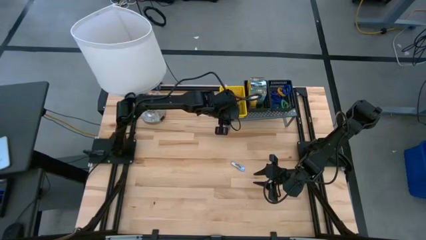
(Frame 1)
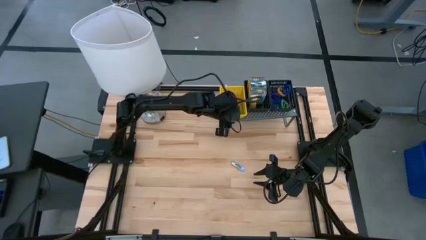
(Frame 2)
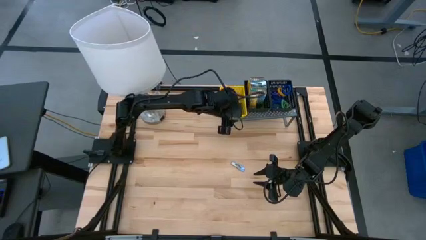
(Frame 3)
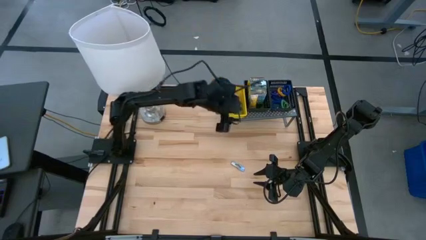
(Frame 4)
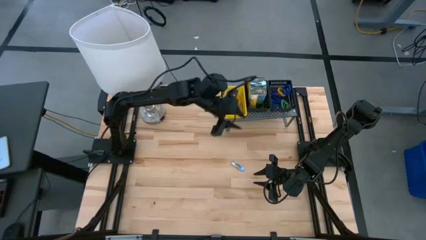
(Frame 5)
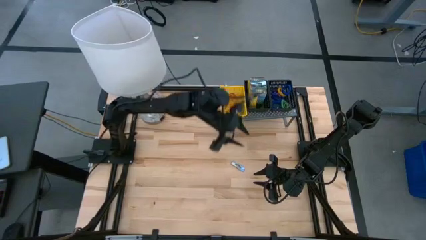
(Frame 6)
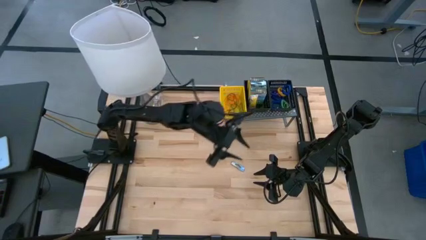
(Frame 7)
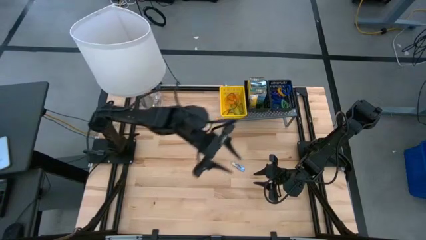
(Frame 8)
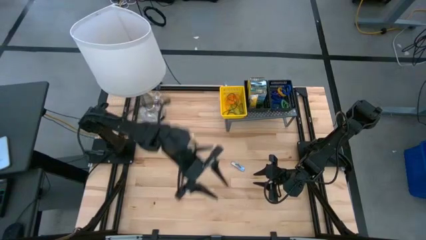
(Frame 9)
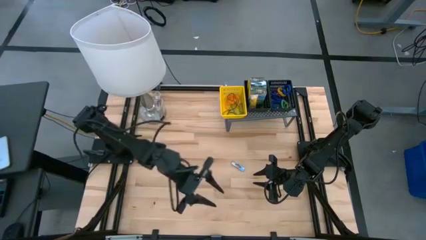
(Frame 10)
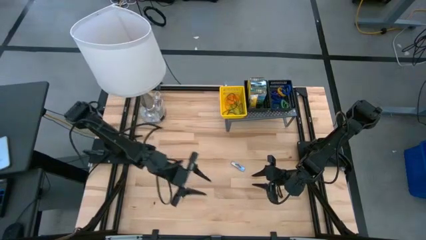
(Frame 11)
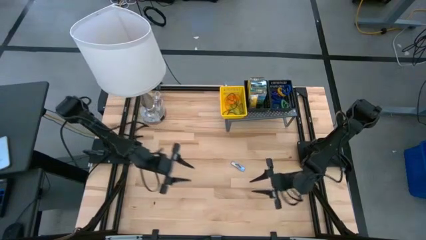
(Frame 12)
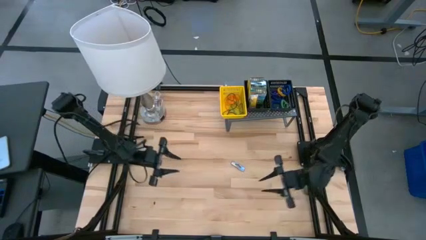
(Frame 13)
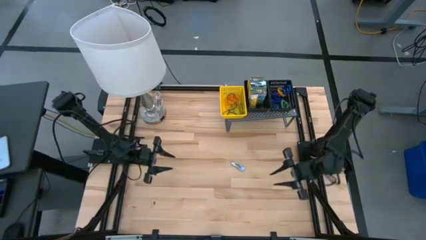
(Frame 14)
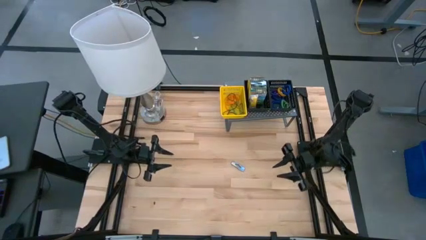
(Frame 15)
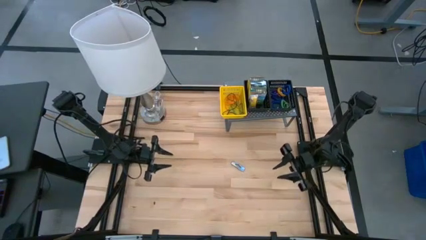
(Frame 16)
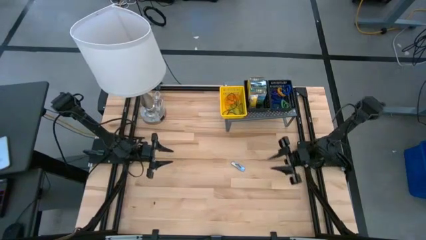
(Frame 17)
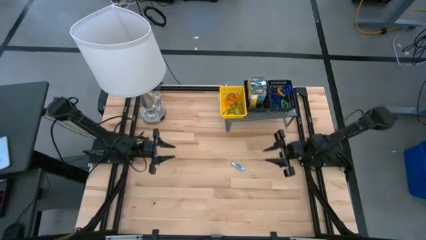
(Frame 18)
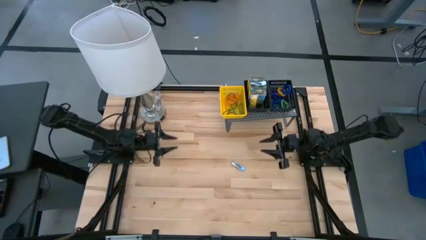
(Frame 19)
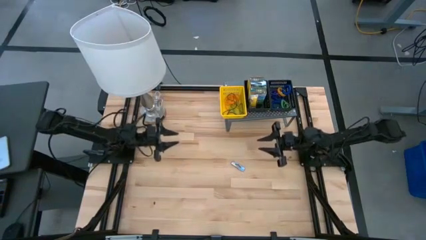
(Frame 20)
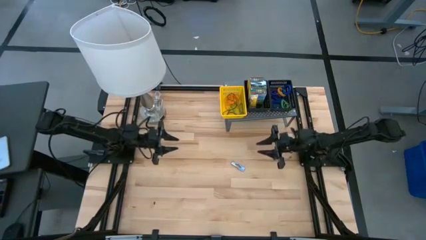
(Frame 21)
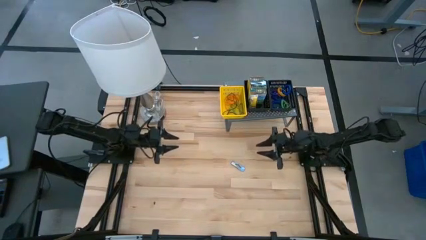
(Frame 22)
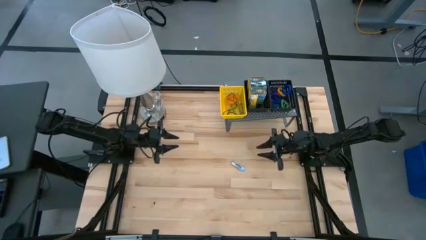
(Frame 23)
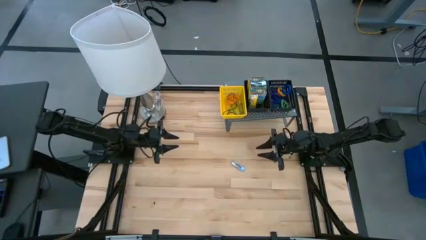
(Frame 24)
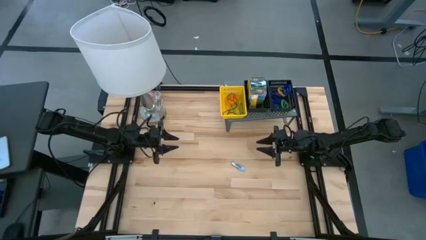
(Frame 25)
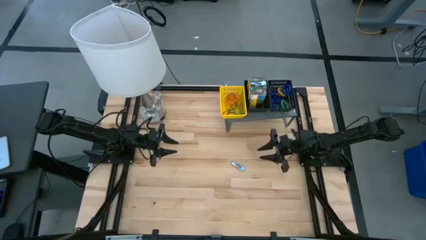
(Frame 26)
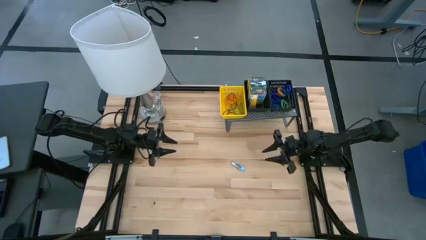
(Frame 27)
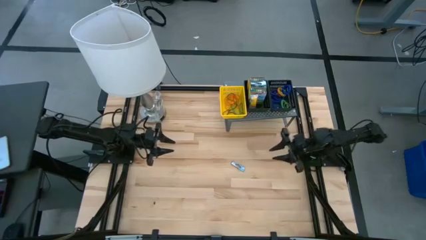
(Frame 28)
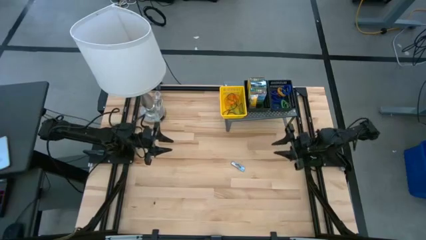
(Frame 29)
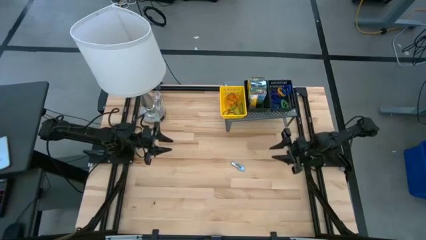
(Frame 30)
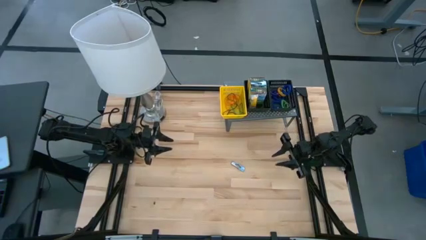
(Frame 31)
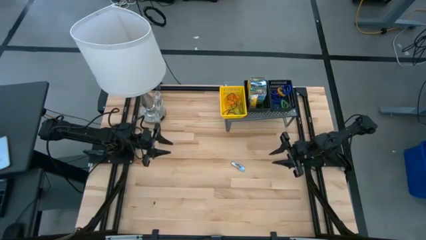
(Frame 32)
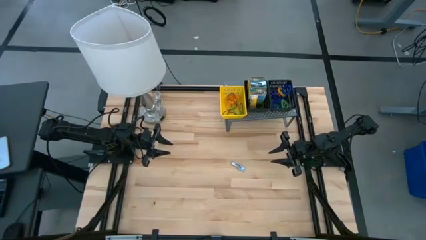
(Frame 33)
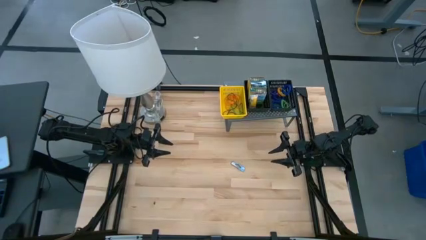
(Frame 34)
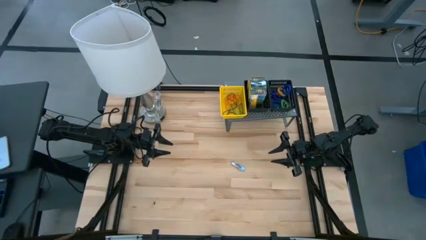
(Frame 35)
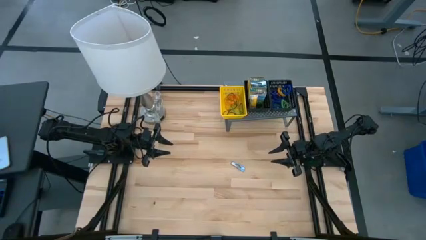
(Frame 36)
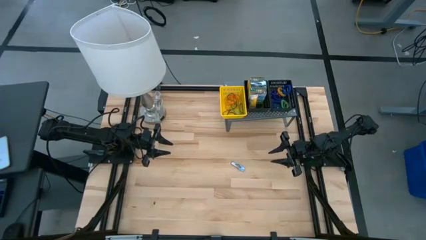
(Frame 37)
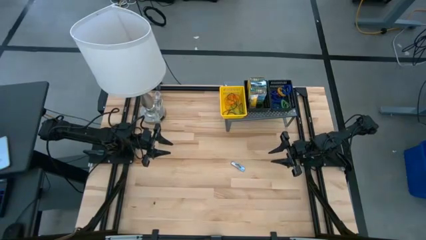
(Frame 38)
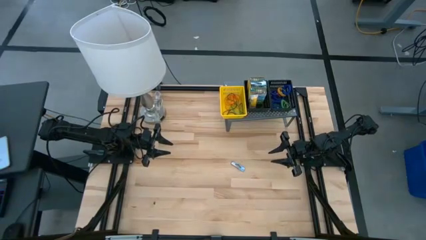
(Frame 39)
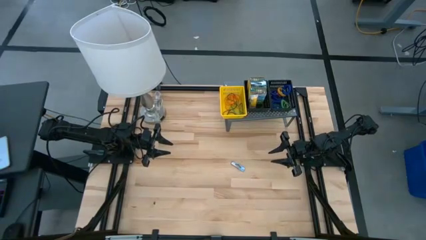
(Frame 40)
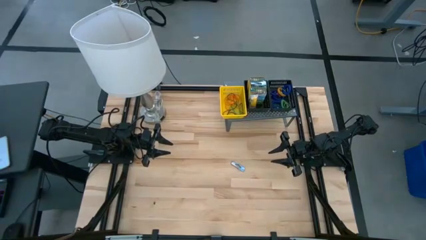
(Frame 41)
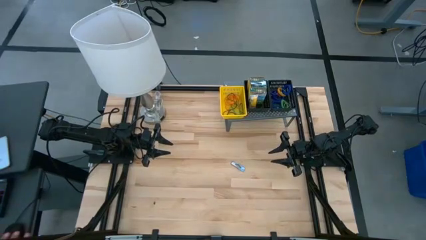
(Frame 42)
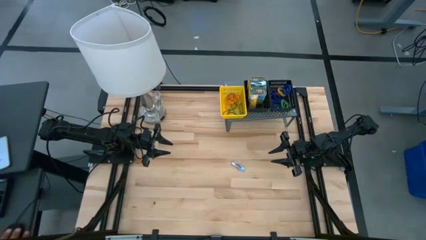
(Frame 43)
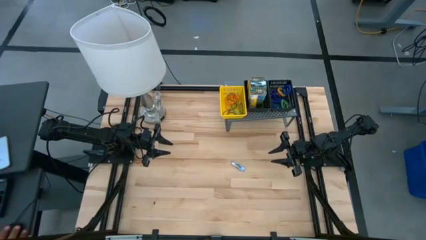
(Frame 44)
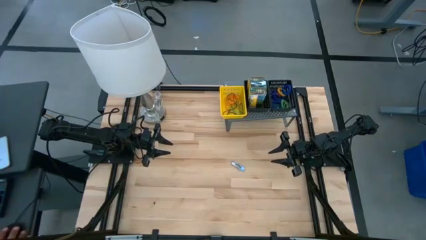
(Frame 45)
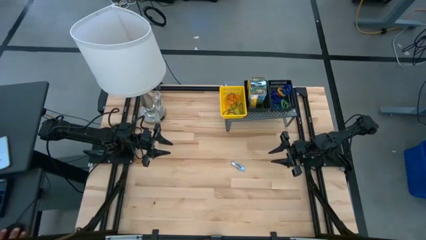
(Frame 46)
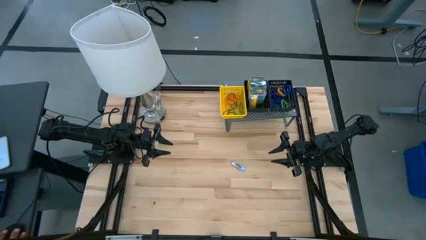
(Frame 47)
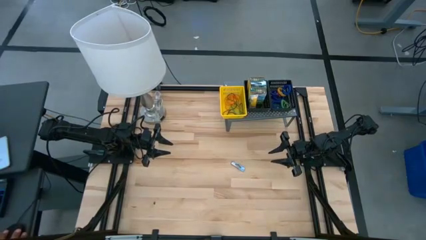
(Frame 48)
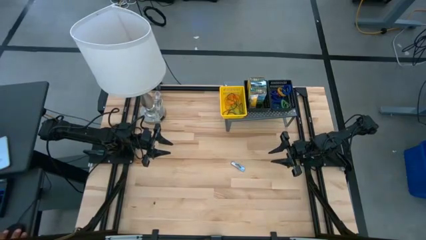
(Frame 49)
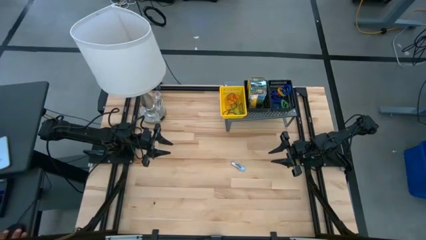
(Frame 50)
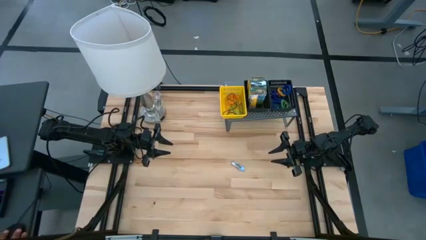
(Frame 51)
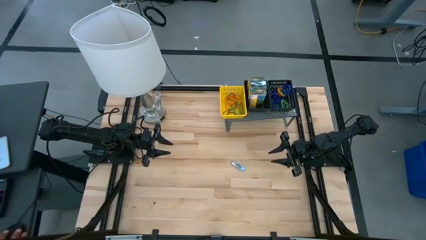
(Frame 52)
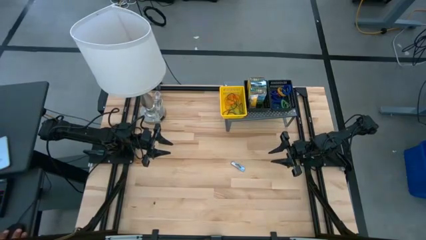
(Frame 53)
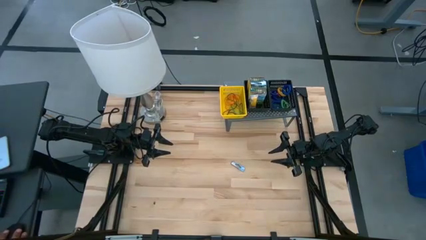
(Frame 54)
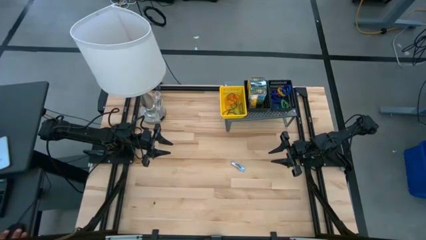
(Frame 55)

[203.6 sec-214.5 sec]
Task: Pick & Place Office Desk Supplies
Return to Home Position

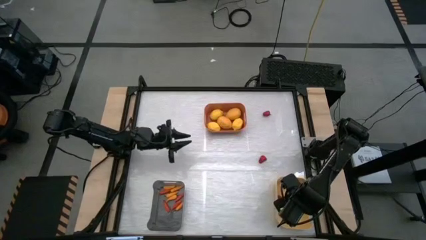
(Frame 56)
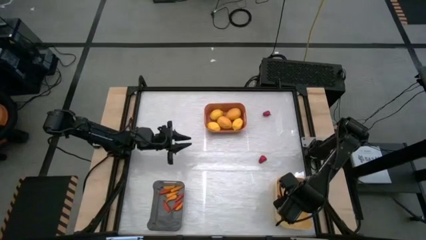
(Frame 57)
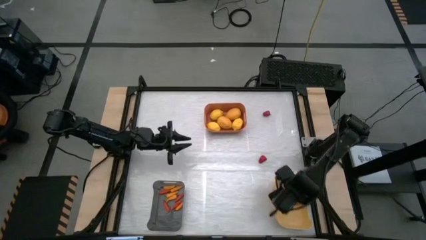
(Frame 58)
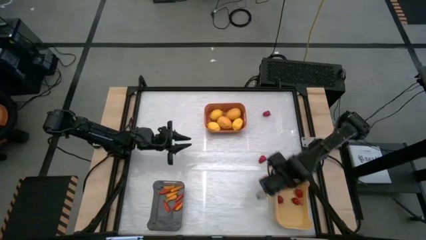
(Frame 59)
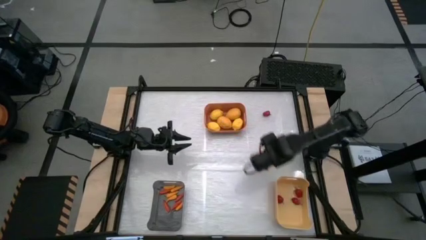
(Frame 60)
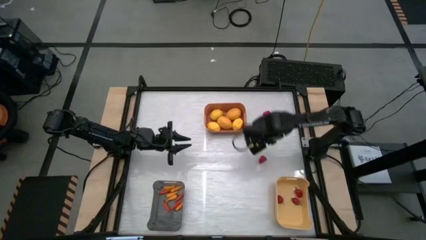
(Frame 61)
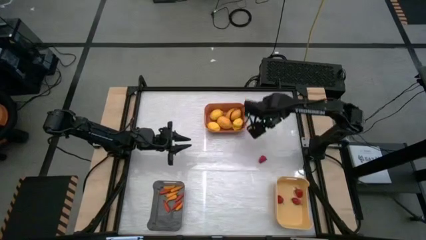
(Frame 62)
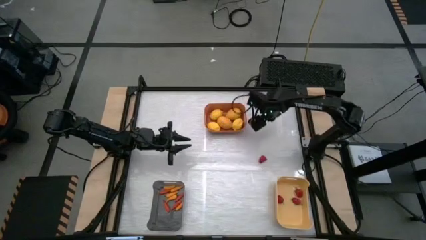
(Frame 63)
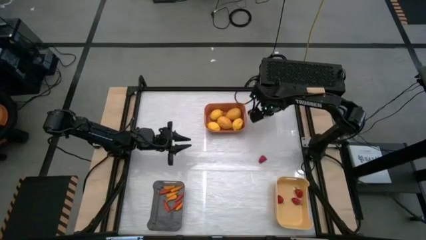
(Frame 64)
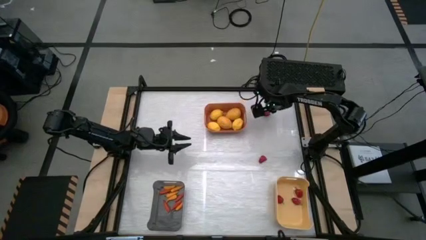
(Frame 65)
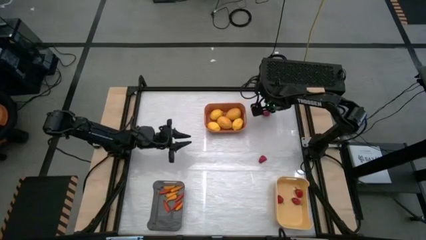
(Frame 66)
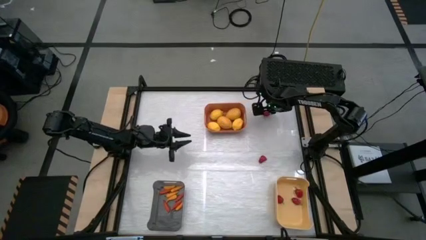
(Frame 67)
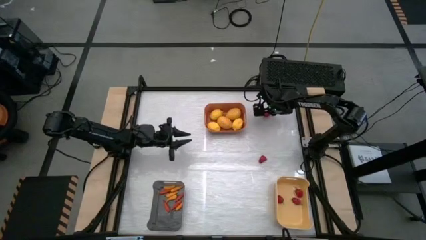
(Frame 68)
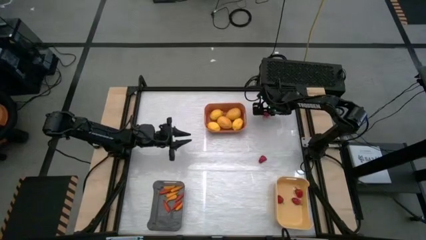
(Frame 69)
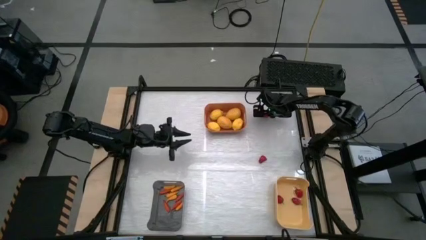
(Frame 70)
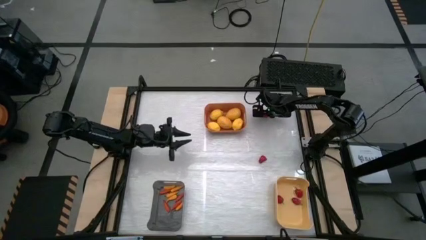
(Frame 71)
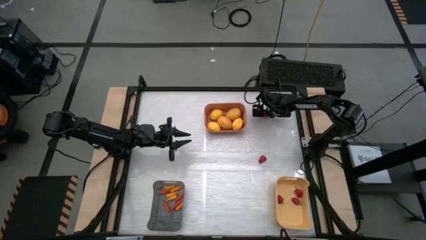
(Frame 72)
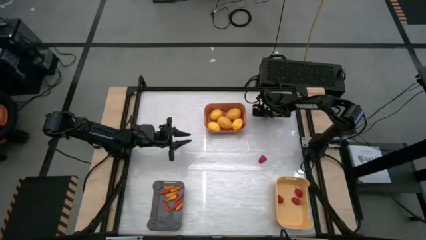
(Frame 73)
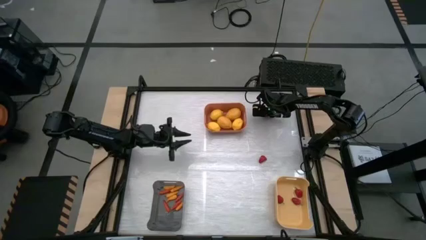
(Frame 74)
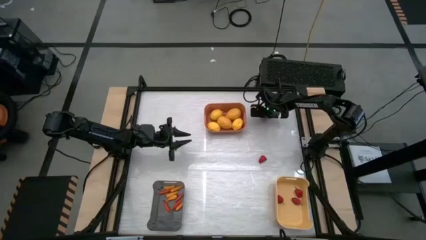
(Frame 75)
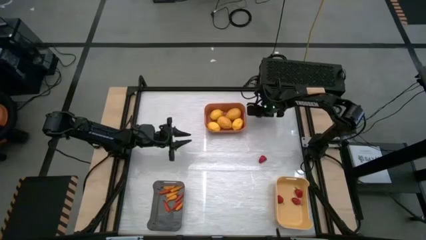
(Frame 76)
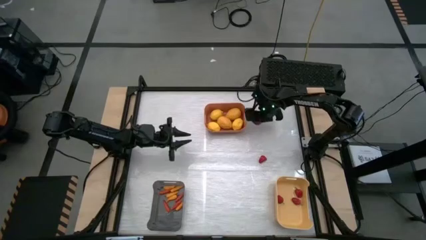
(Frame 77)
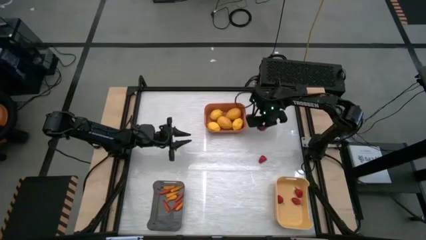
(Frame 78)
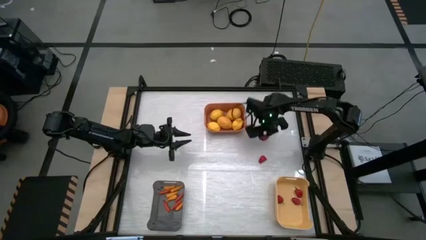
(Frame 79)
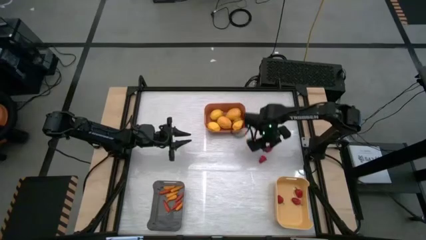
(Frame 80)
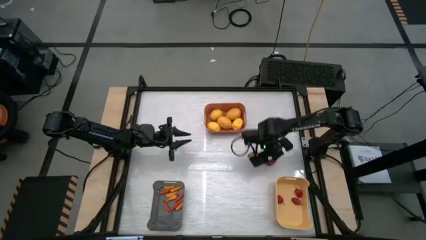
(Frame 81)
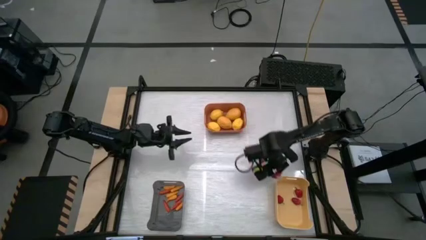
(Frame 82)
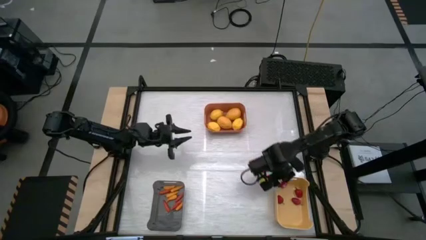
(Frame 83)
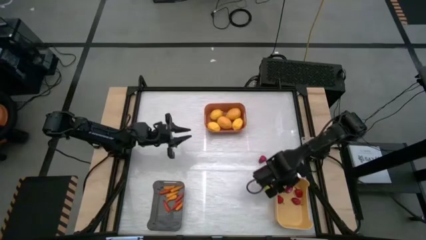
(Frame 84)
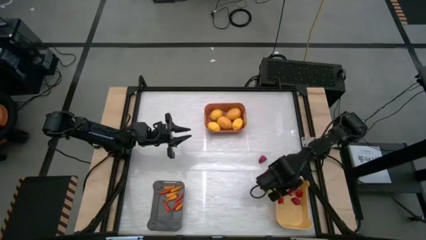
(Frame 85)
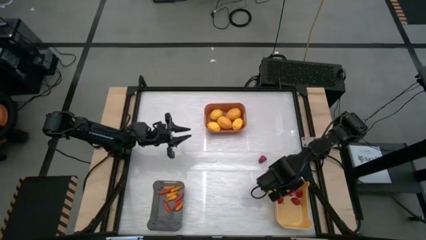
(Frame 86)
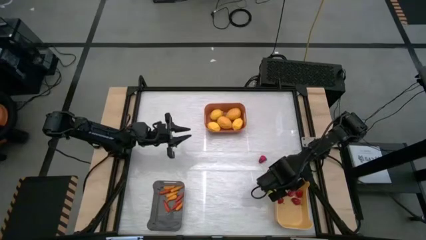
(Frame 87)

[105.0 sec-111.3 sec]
Task: Sort produce into baskets
Put the red chili pepper into the yellow bin
